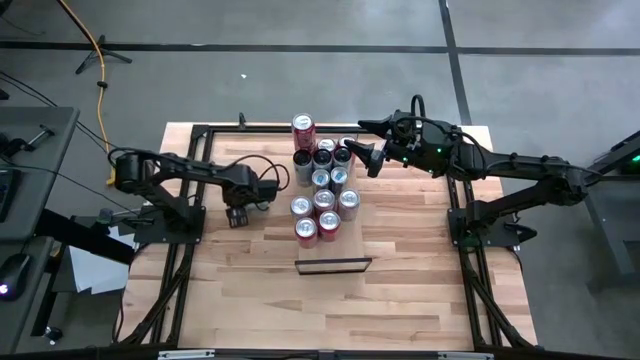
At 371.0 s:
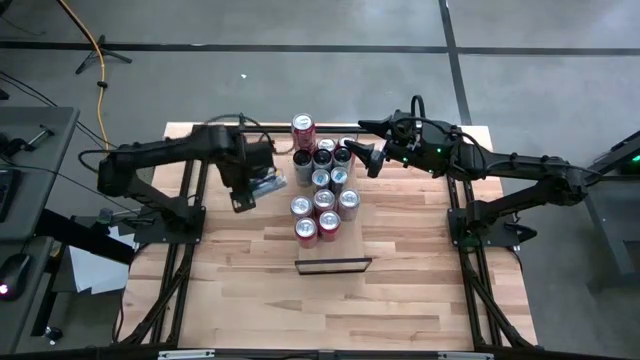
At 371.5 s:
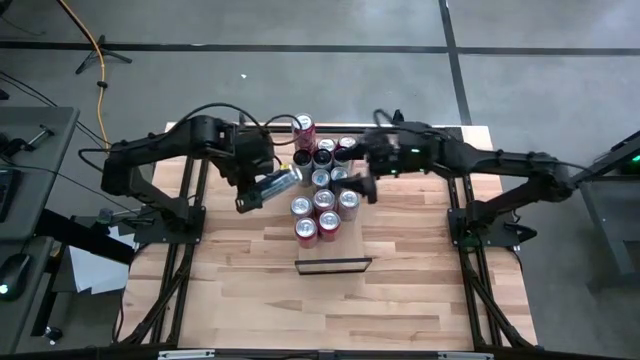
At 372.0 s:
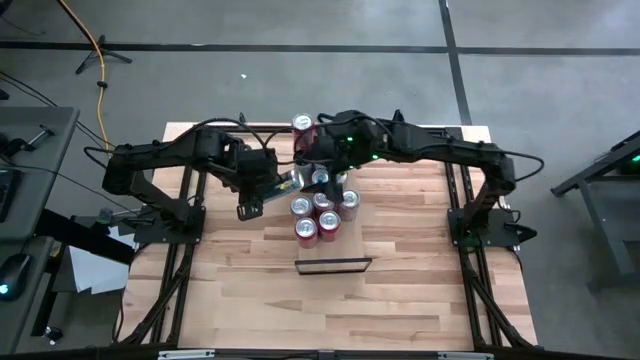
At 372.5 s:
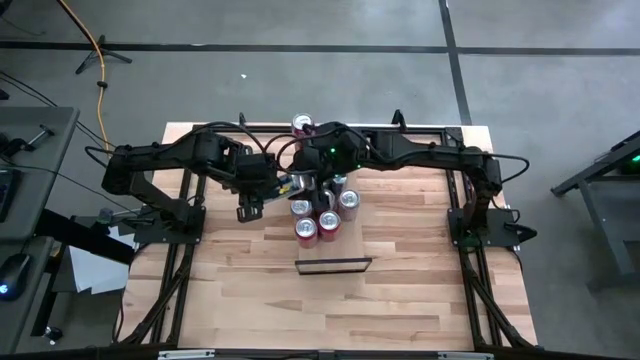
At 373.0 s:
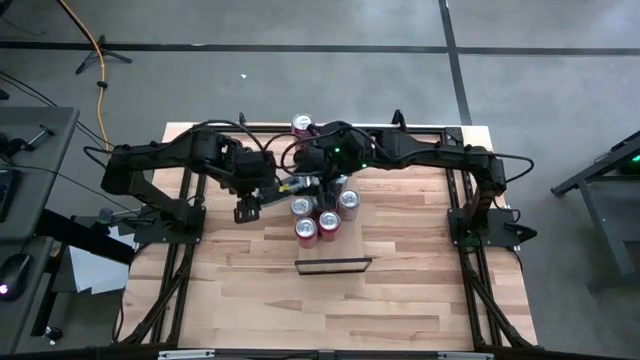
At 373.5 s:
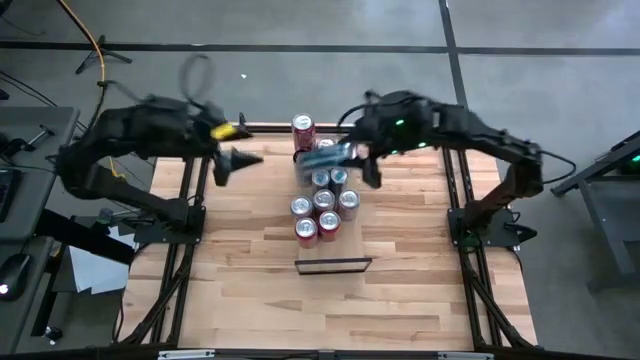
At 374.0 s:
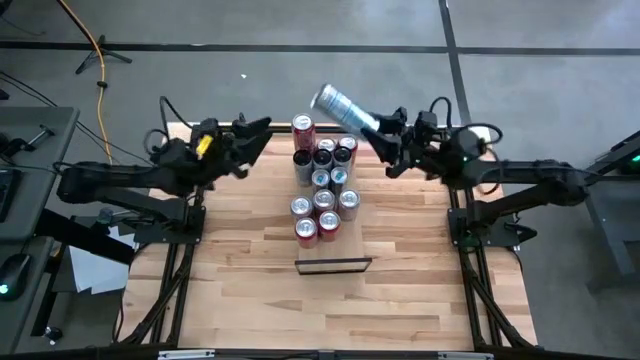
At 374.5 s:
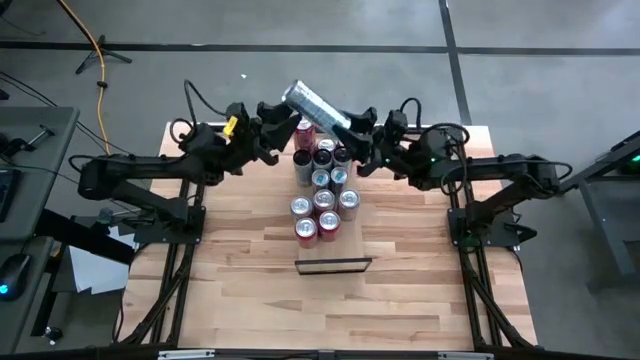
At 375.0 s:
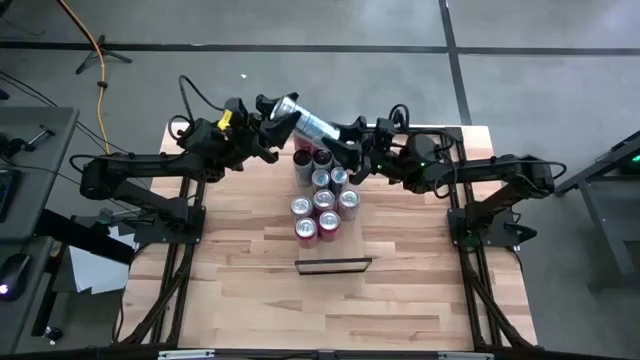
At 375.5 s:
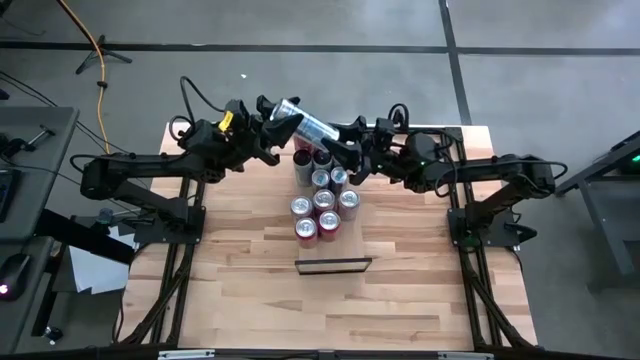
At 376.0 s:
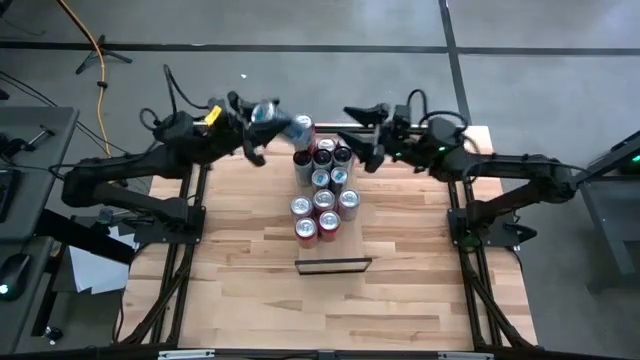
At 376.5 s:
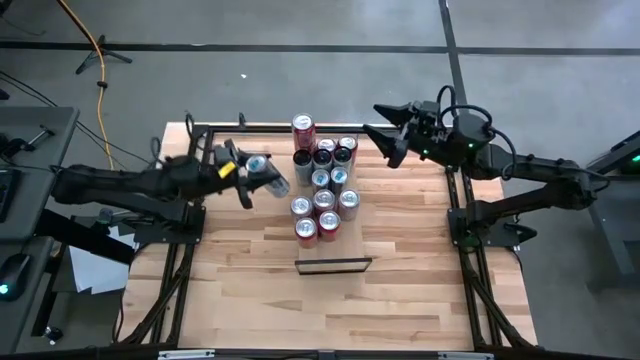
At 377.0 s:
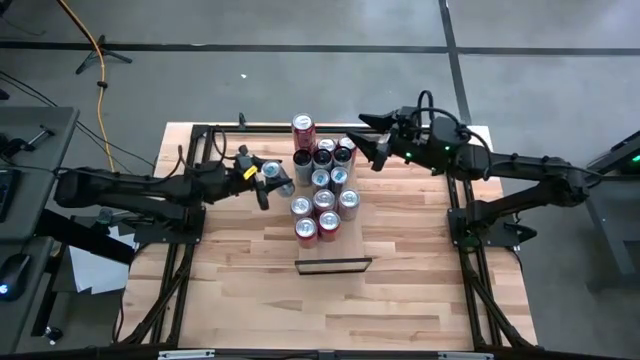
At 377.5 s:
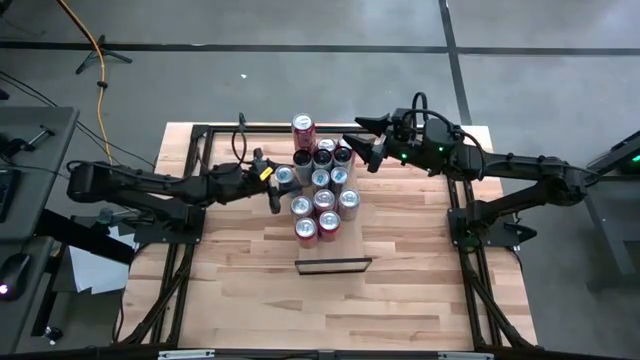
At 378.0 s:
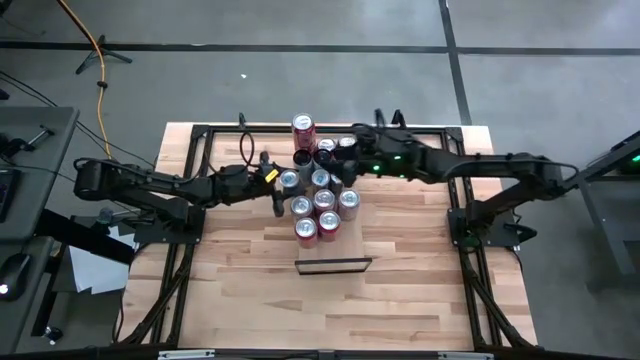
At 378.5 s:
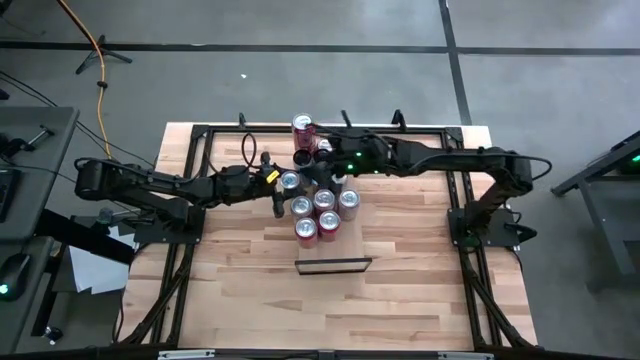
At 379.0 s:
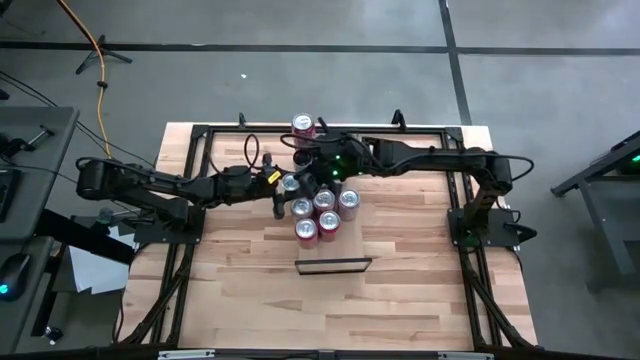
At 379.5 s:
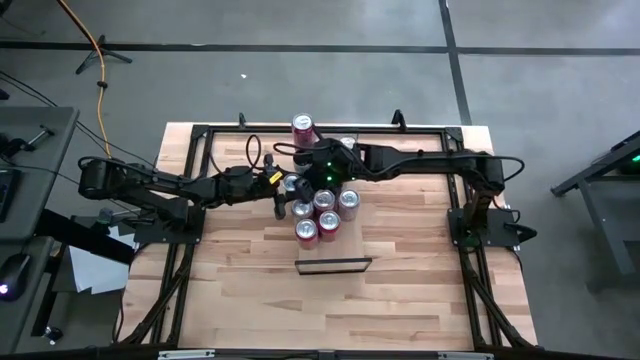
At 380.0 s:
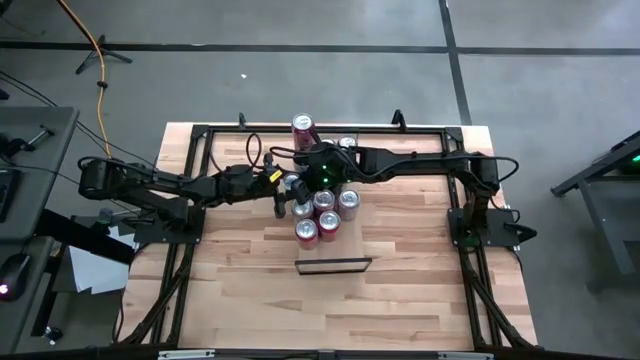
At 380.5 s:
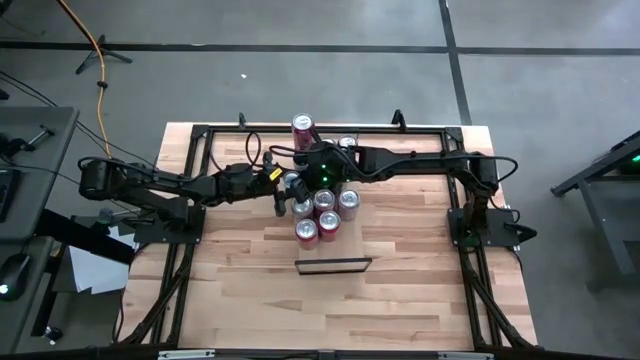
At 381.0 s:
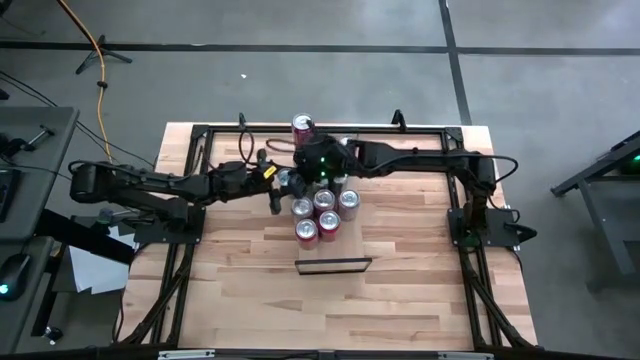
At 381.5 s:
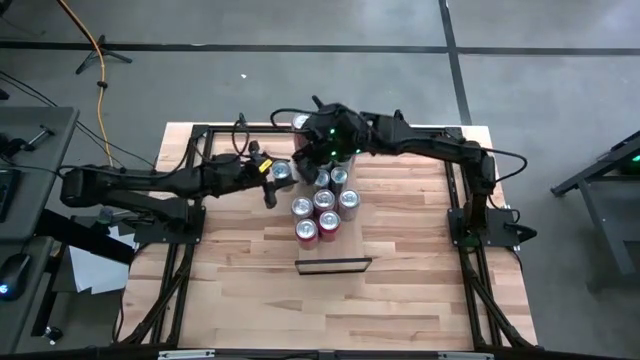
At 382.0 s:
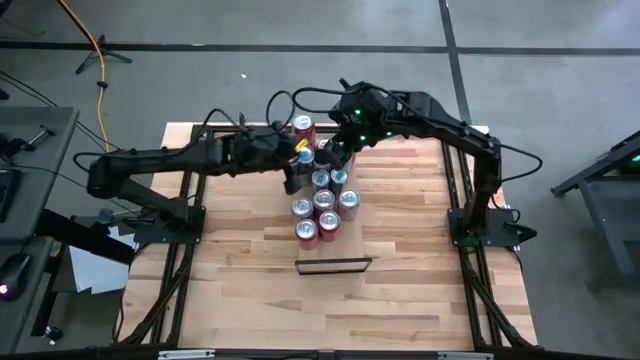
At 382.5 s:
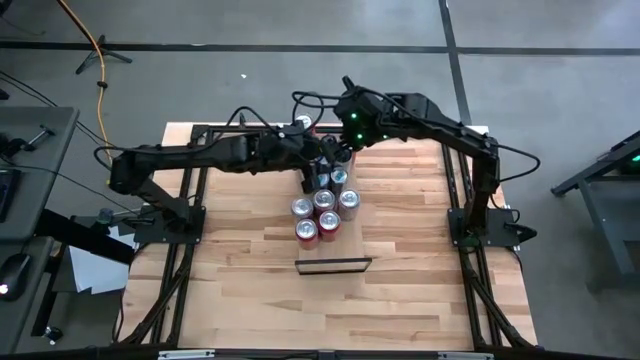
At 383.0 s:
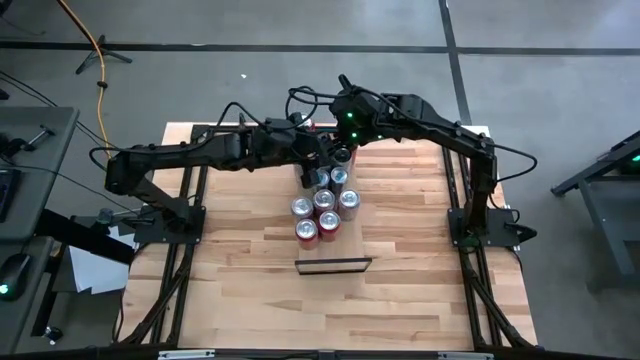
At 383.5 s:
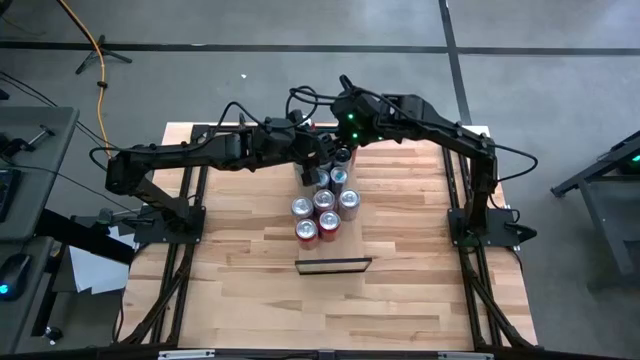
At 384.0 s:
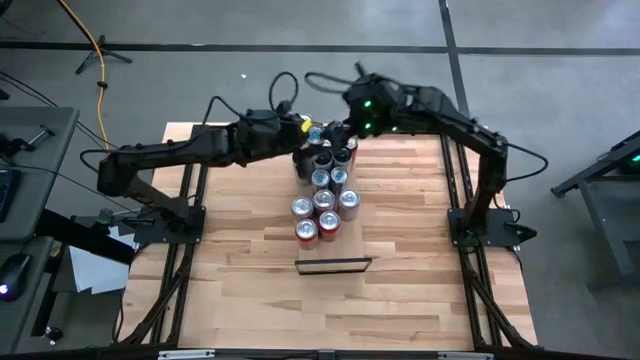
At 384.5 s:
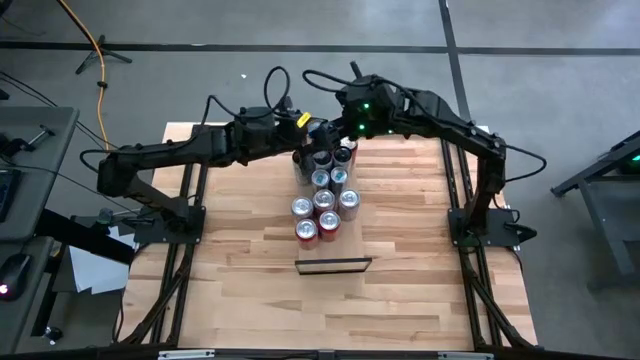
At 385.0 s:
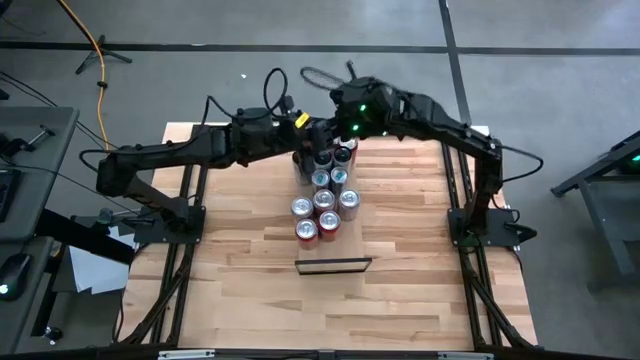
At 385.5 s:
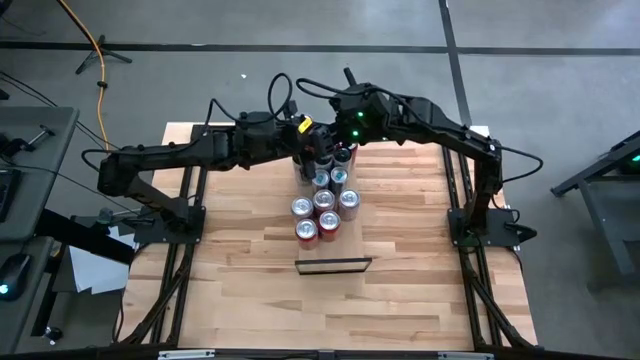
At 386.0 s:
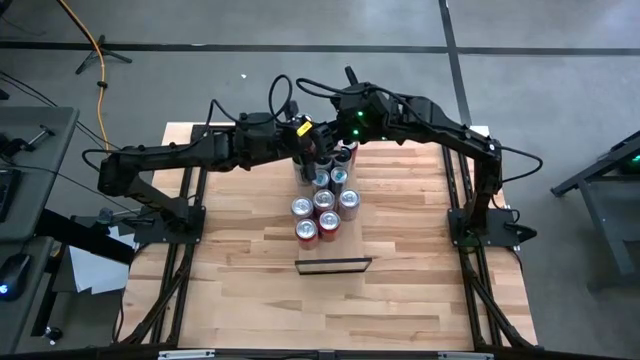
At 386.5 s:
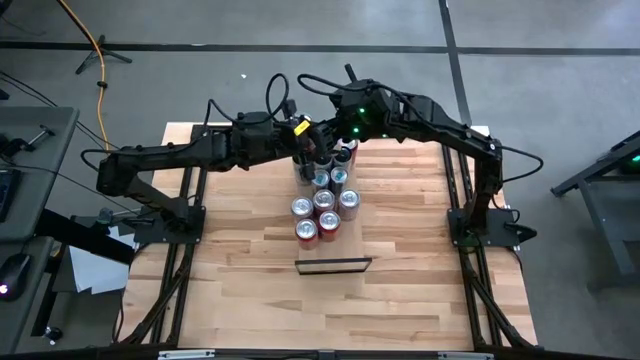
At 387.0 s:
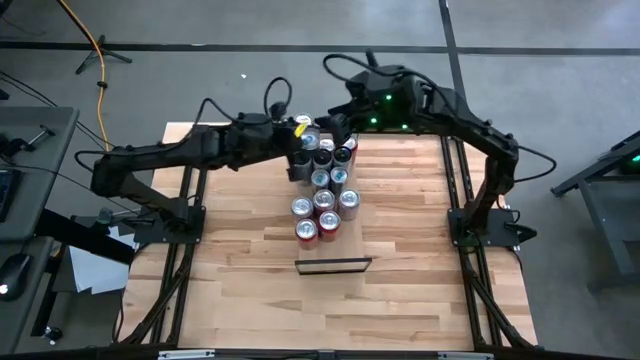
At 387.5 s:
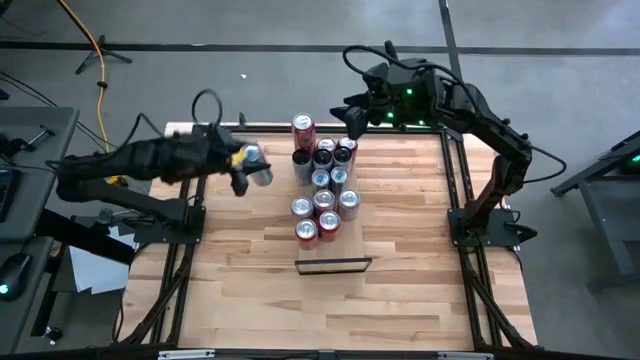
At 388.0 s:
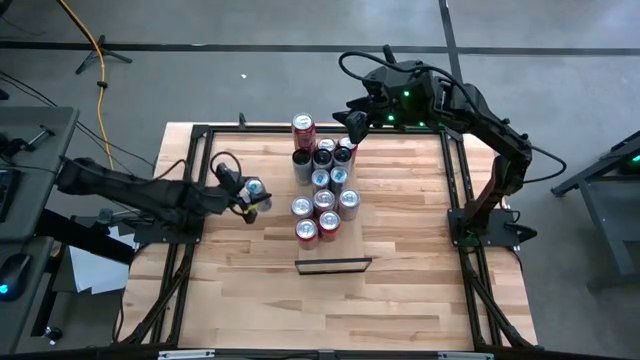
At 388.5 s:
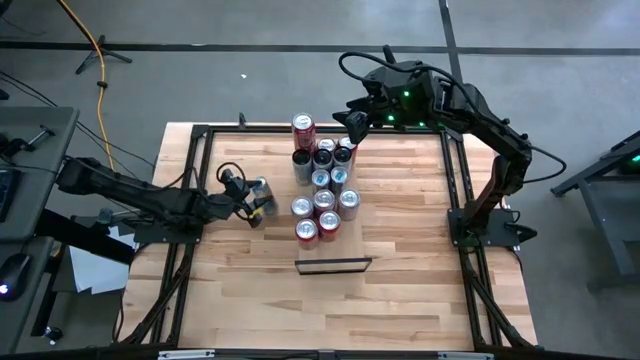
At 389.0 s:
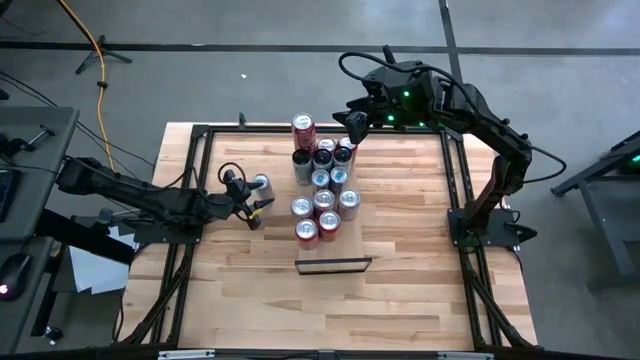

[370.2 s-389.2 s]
Task: Place canned beverage on shelf
Put the blue soda can on the shelf aligned with the other blue soda can

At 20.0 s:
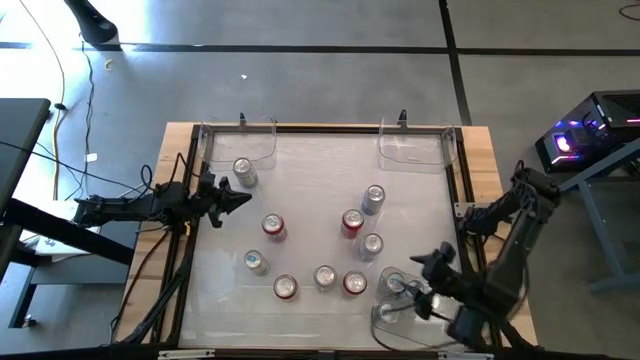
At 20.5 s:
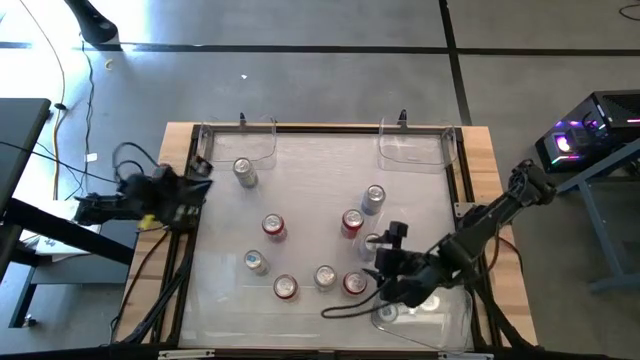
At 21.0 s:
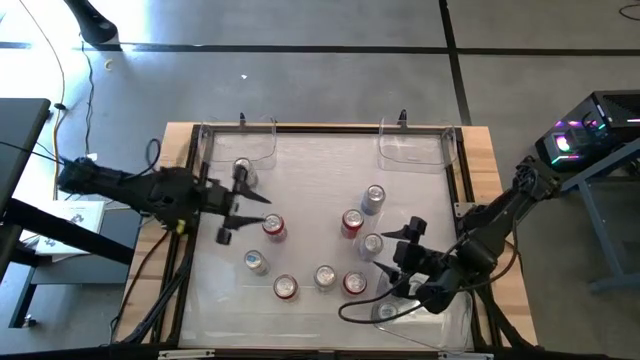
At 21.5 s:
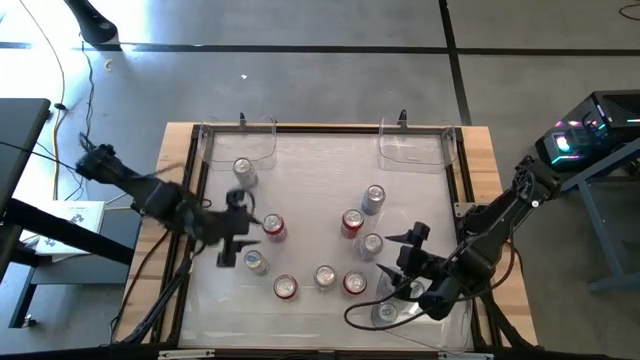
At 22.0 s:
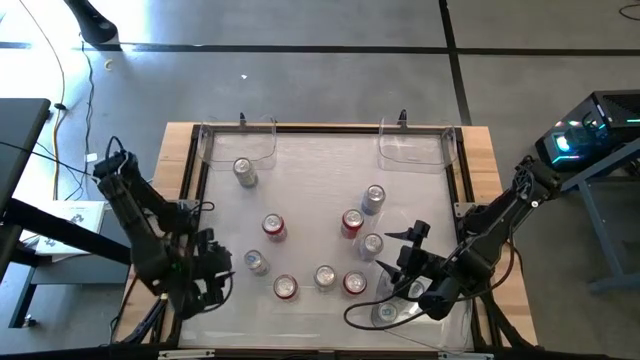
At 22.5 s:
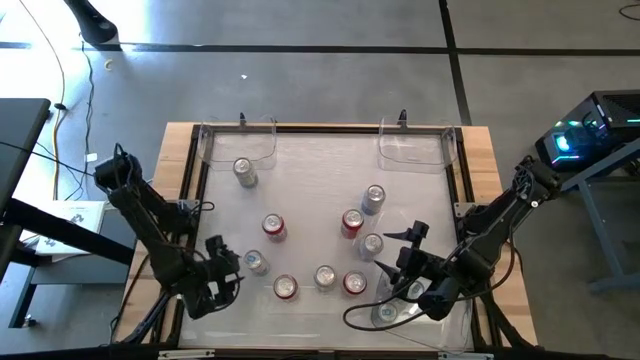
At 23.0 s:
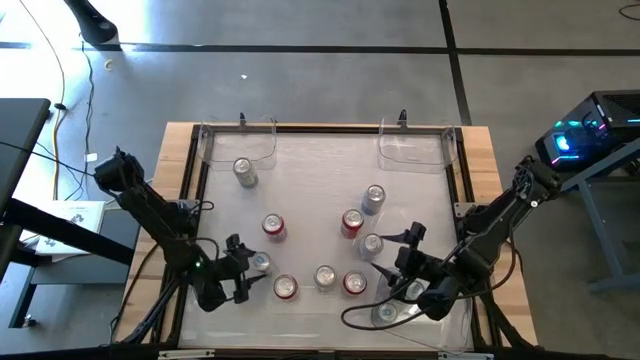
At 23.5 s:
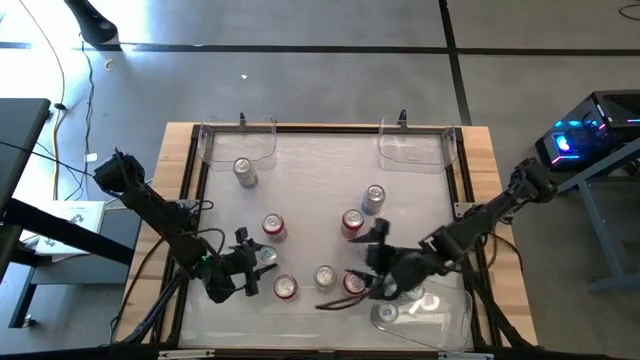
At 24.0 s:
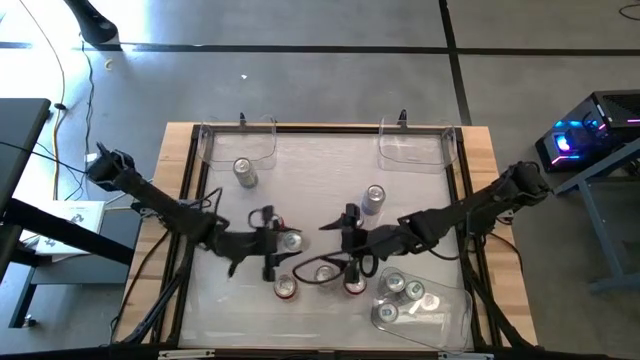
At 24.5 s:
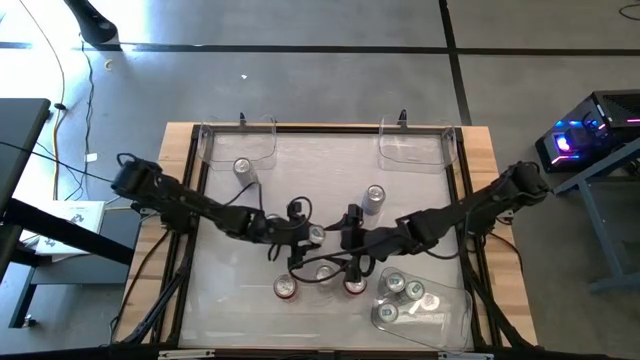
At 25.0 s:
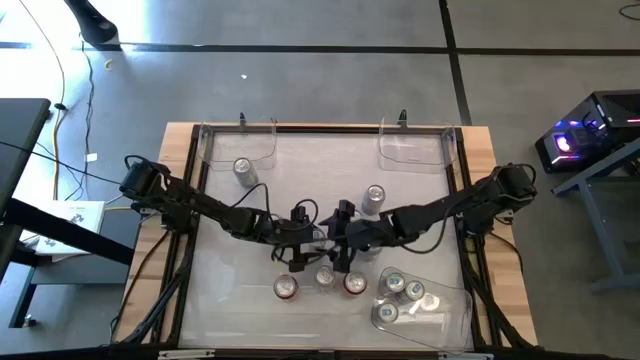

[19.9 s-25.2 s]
Task: Sort soda cans
Move the blue soda can to the center
